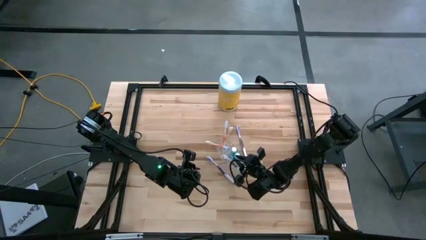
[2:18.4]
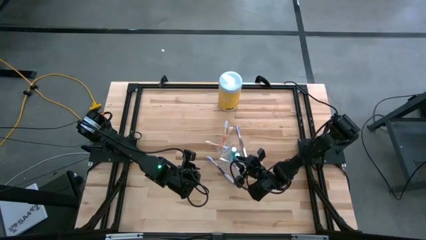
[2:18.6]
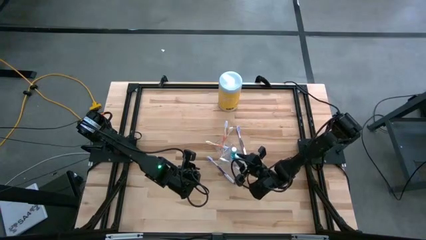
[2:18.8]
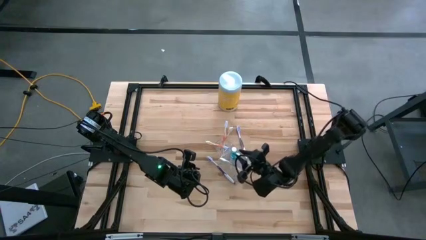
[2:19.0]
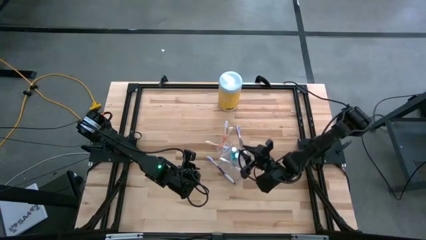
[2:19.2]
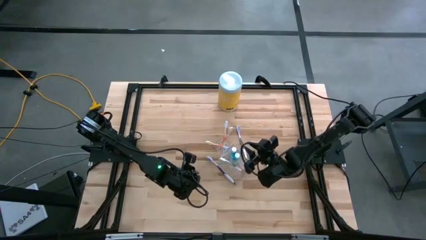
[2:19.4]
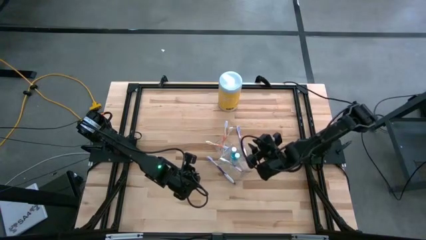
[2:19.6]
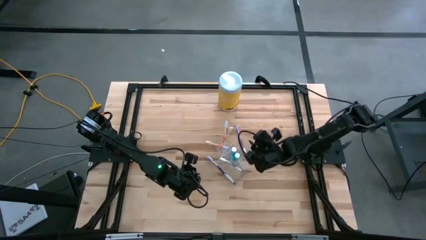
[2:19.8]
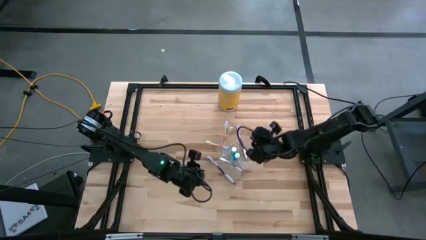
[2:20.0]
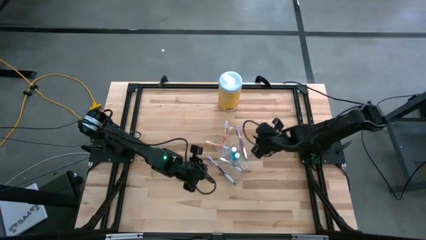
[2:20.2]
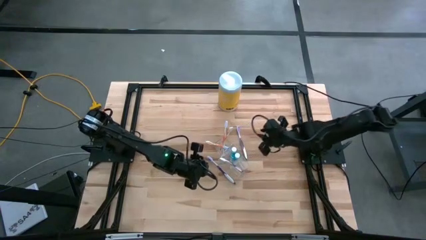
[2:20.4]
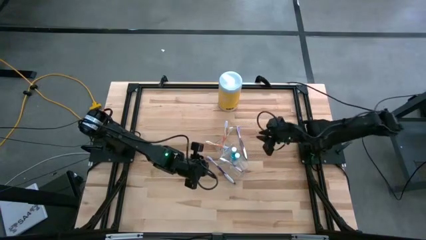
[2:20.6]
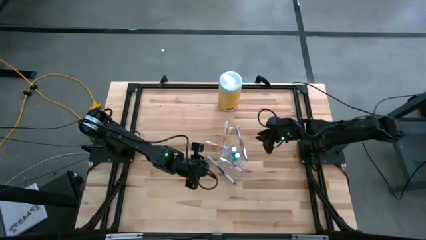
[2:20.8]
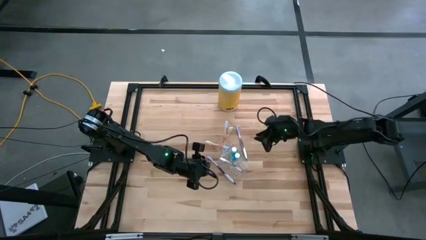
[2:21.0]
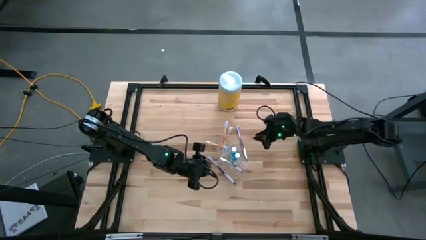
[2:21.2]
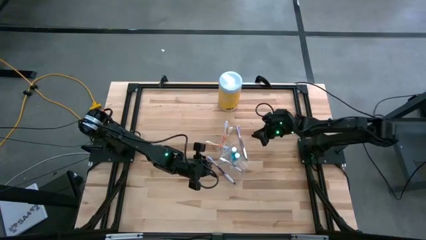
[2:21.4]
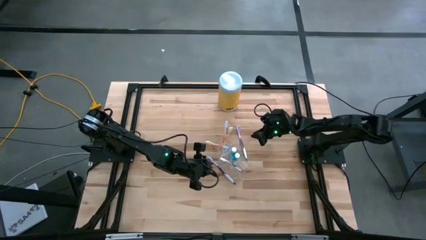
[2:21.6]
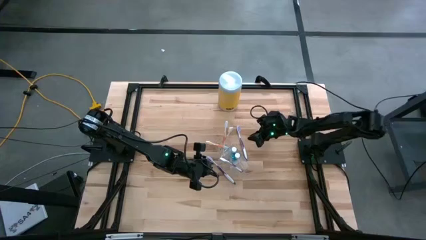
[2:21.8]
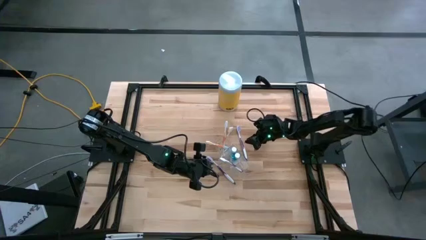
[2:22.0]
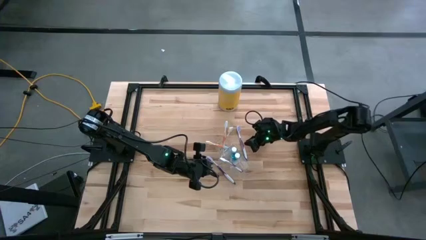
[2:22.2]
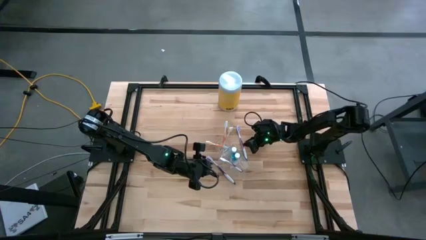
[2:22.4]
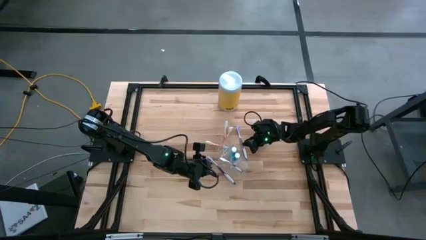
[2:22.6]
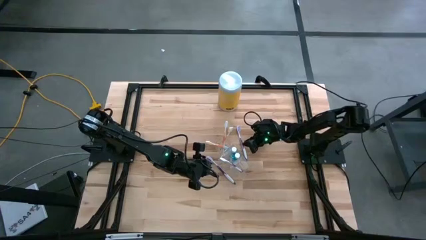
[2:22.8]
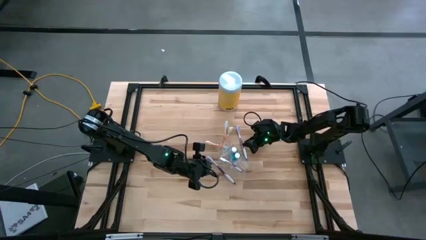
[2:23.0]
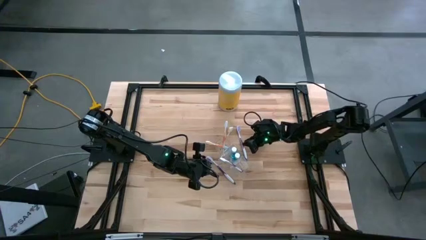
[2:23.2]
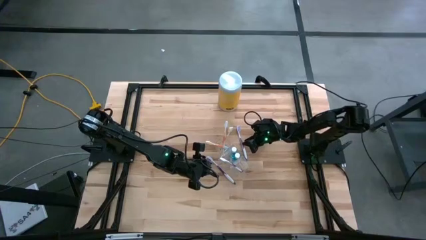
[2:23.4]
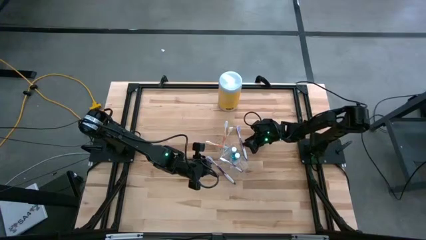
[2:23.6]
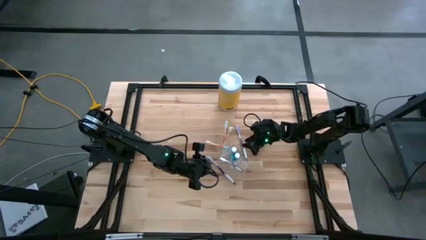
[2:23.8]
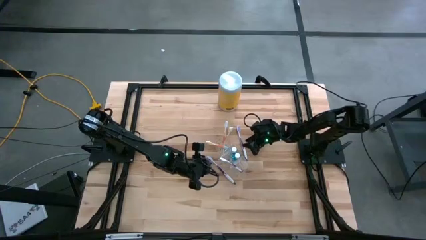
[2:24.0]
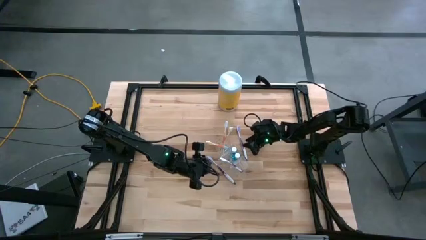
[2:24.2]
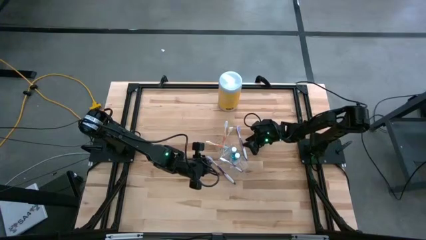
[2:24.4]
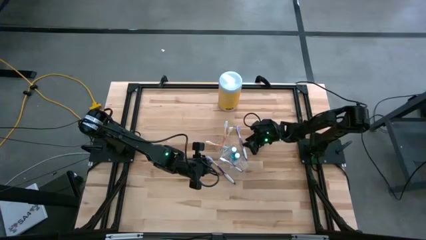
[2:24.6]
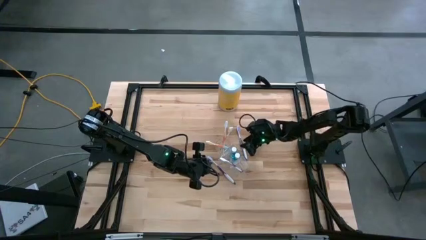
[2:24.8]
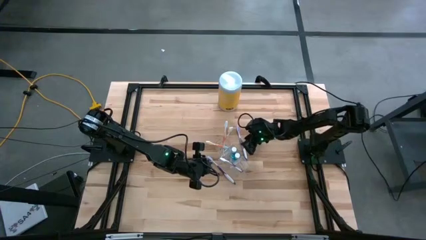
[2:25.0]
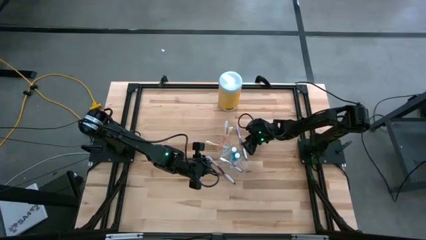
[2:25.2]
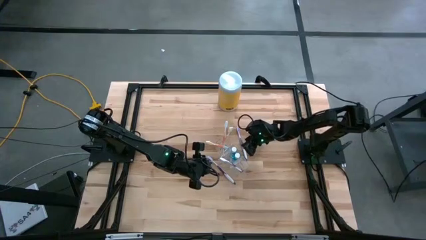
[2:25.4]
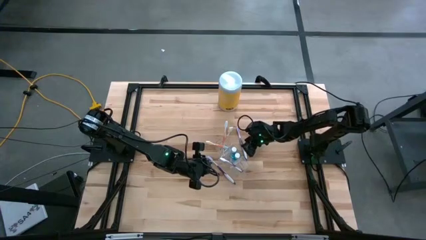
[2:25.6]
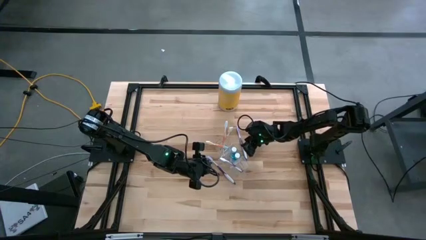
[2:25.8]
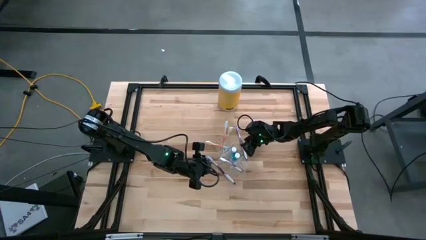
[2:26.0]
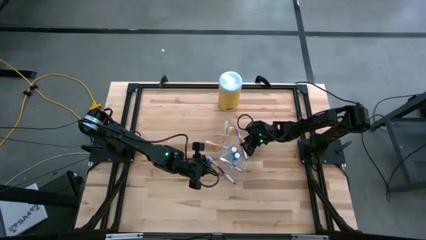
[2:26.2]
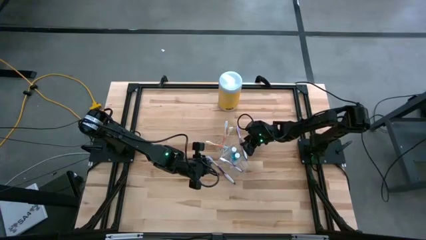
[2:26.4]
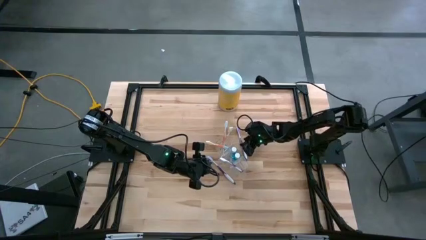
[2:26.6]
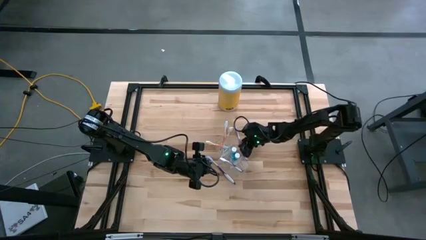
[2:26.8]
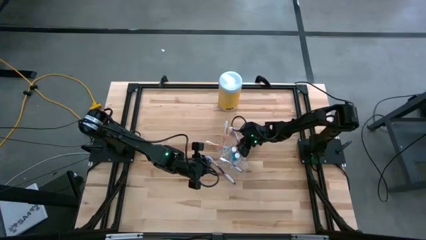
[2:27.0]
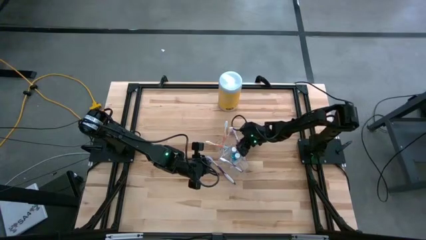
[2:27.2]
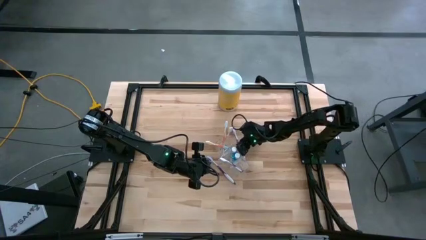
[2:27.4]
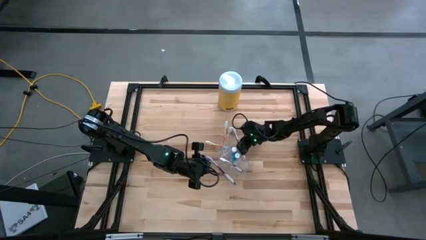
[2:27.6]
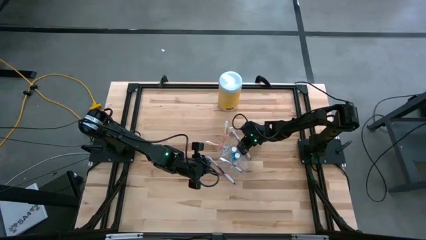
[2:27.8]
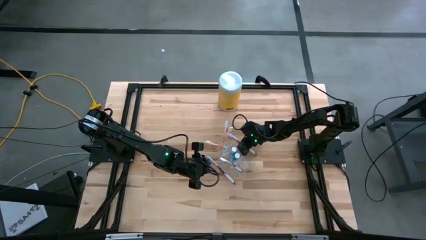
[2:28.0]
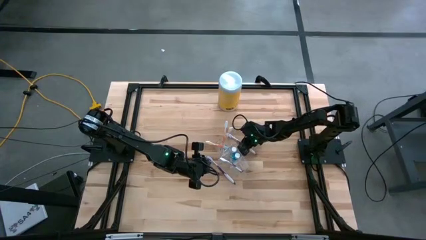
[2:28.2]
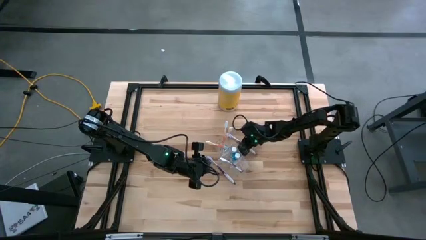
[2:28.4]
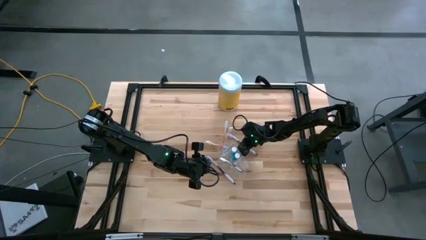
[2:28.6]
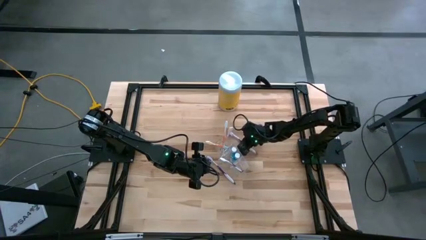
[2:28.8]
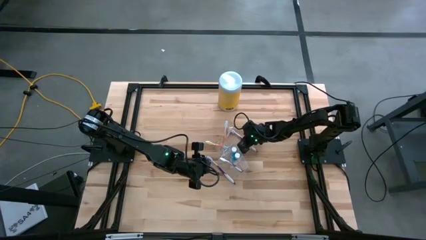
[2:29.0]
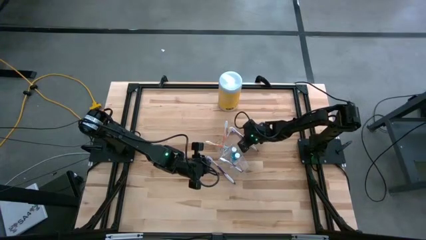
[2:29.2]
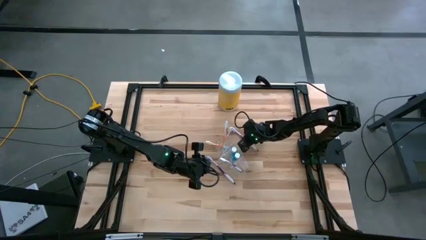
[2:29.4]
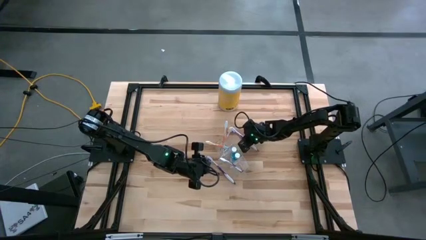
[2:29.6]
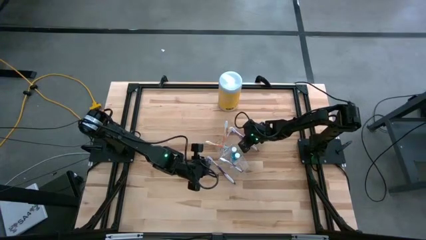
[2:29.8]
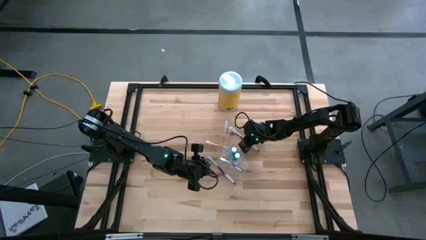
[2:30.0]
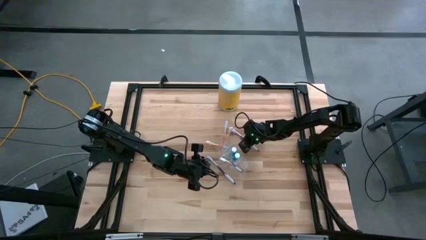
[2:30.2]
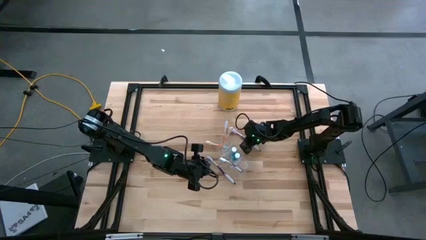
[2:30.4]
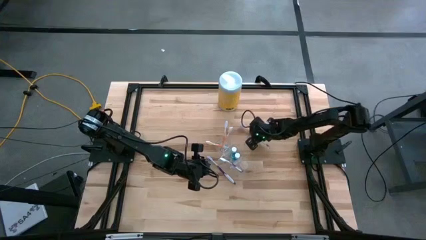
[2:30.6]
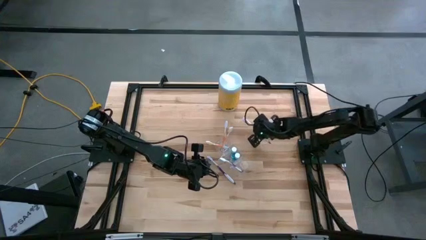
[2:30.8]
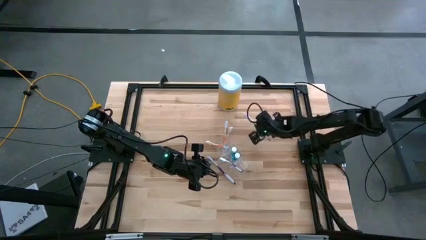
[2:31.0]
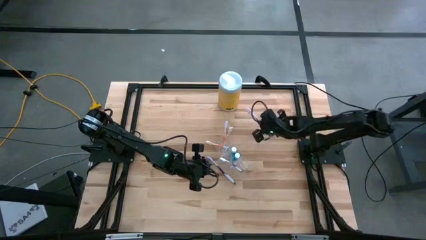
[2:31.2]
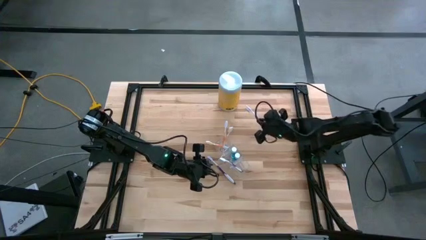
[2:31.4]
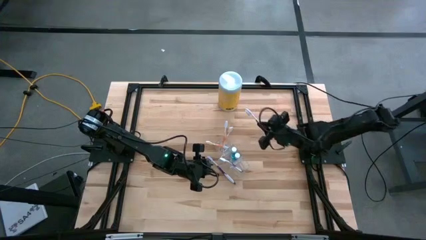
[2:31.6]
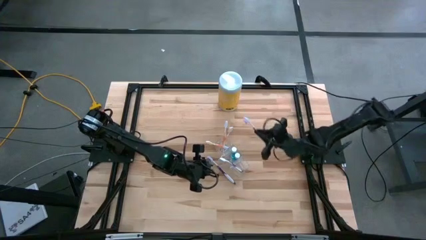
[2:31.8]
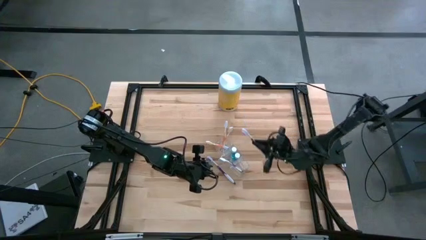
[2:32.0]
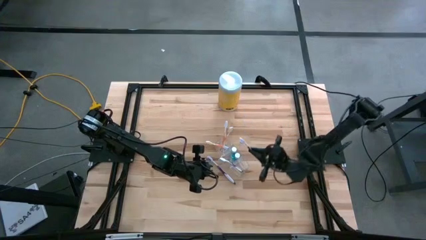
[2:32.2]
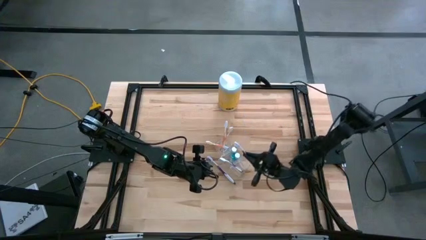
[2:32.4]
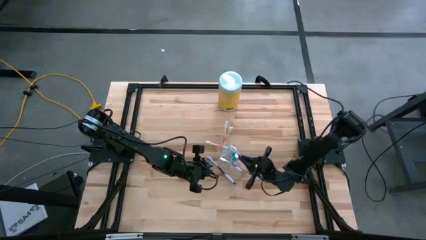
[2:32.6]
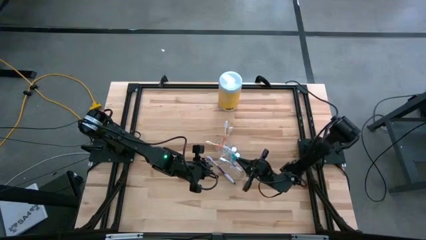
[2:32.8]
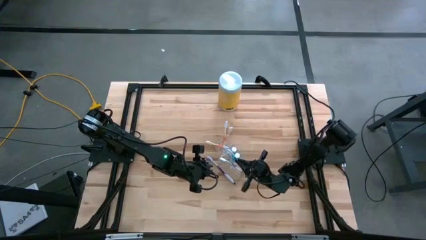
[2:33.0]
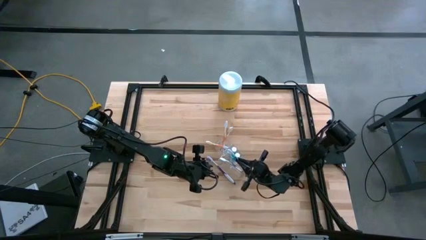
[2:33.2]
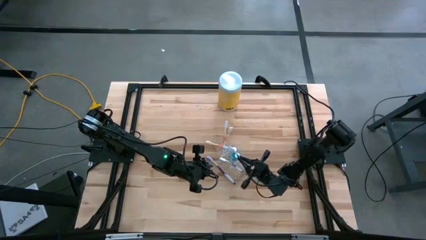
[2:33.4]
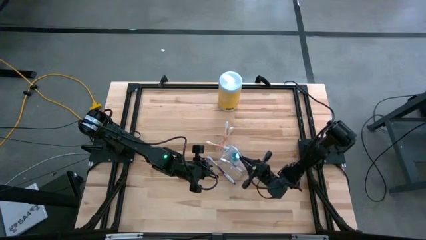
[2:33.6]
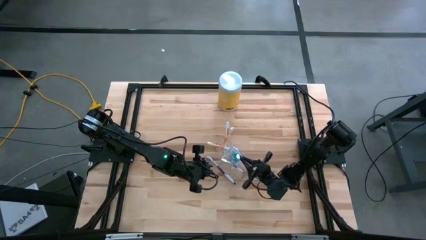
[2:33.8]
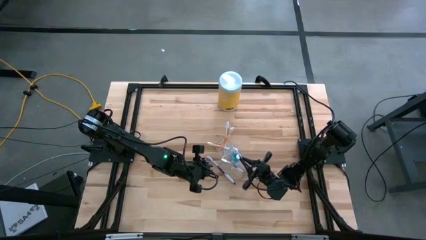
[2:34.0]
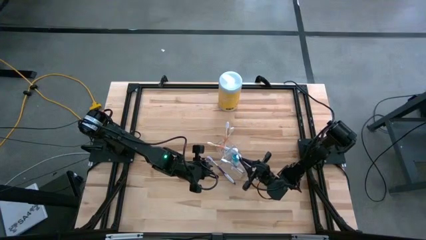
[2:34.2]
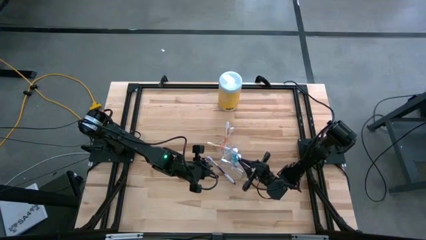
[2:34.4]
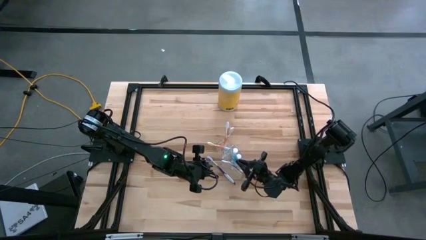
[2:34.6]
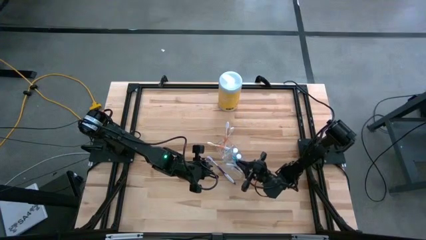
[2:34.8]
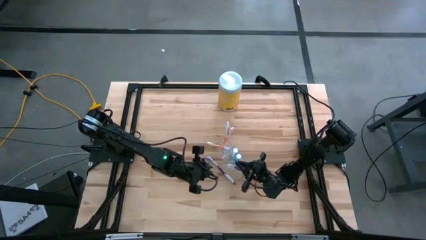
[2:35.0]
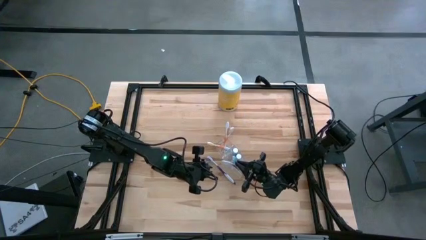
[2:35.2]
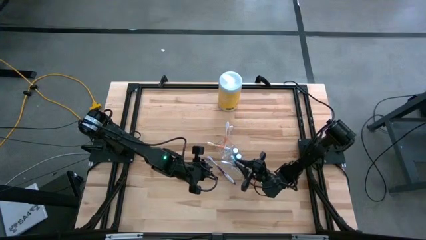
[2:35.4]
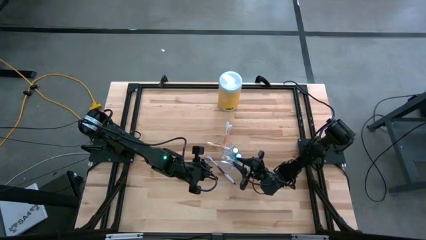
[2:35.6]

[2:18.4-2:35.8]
Task: Pick & Place toothbrushing station
Put the top purple toothbrush into the bottom compartment of the transparent organizer
